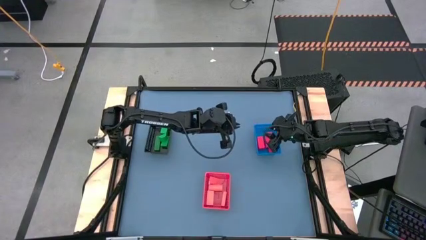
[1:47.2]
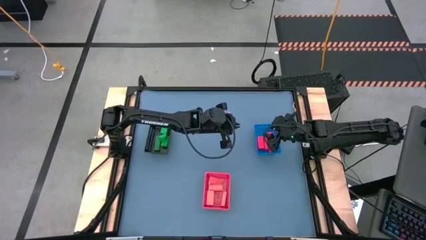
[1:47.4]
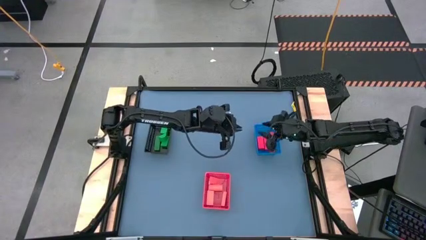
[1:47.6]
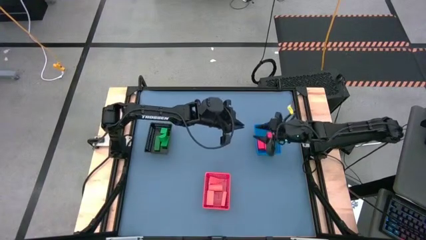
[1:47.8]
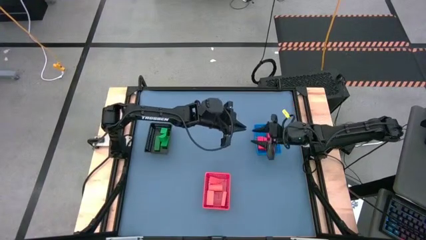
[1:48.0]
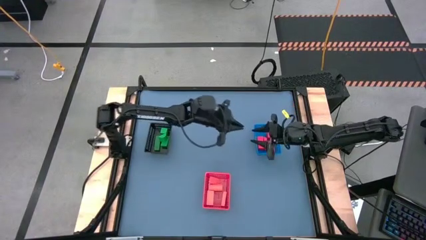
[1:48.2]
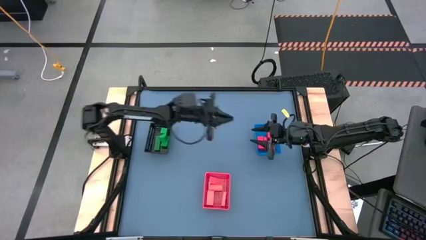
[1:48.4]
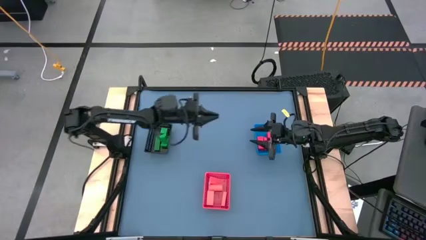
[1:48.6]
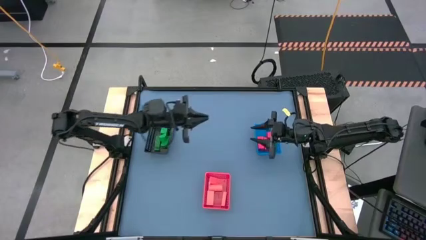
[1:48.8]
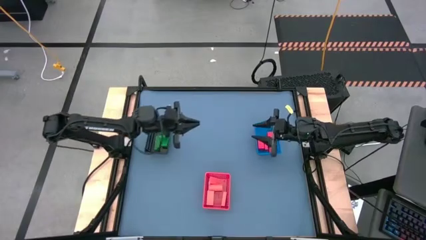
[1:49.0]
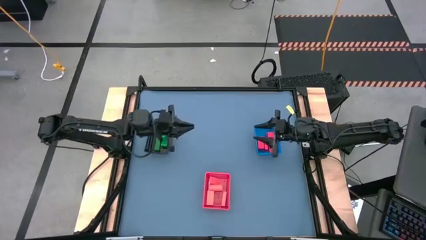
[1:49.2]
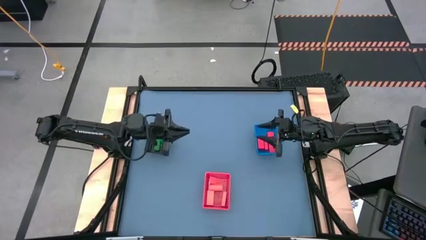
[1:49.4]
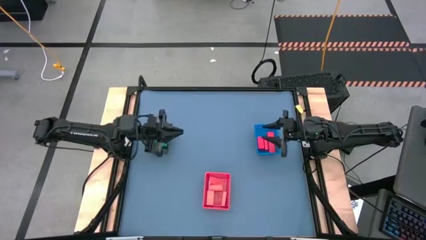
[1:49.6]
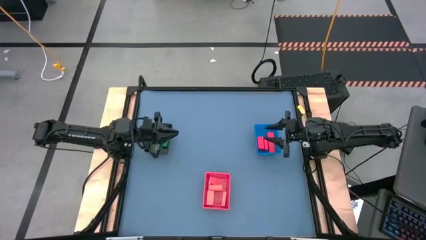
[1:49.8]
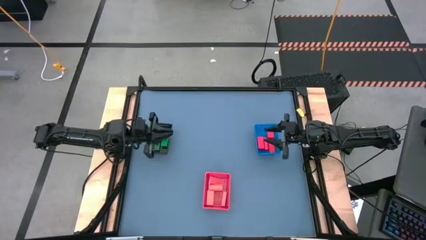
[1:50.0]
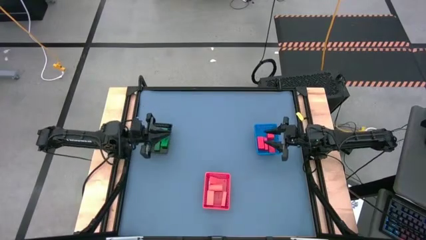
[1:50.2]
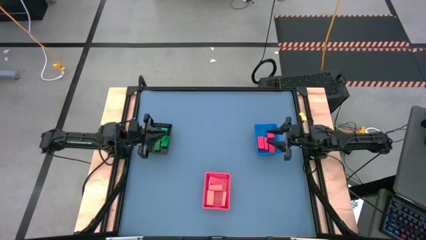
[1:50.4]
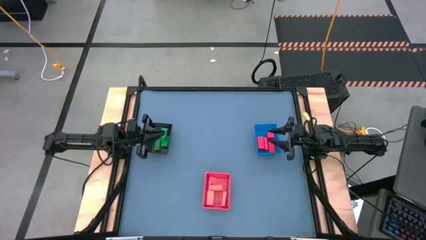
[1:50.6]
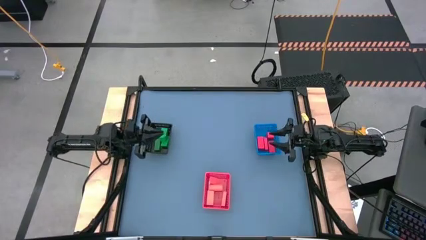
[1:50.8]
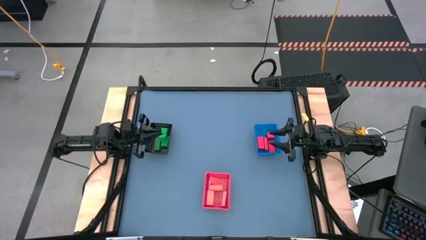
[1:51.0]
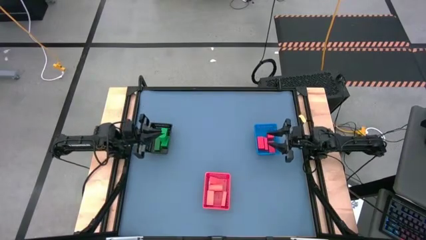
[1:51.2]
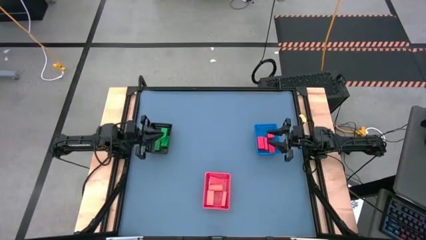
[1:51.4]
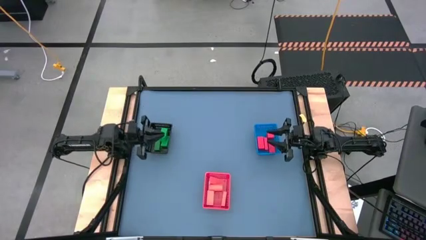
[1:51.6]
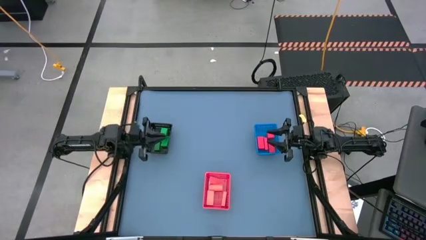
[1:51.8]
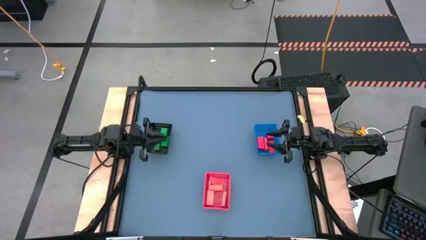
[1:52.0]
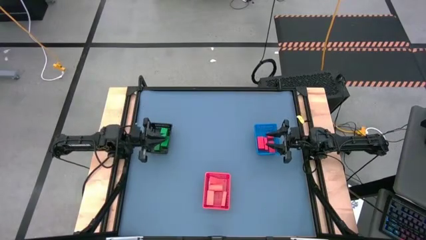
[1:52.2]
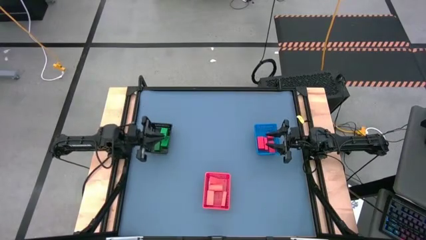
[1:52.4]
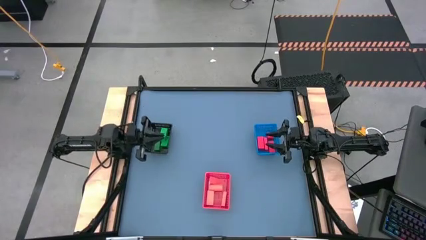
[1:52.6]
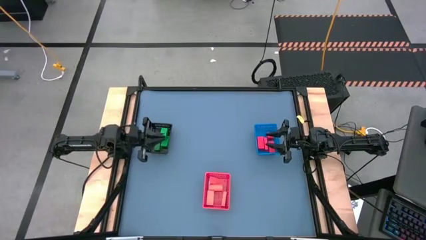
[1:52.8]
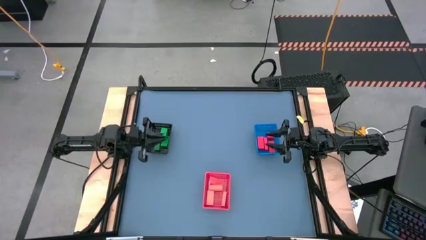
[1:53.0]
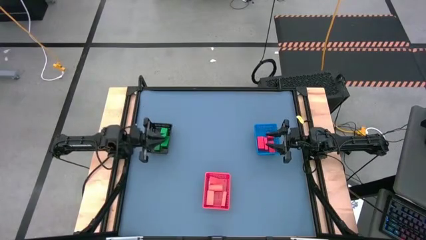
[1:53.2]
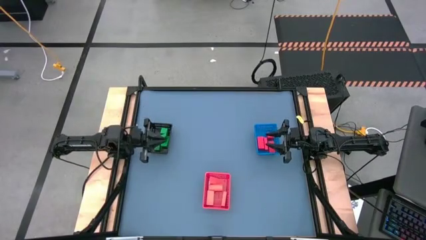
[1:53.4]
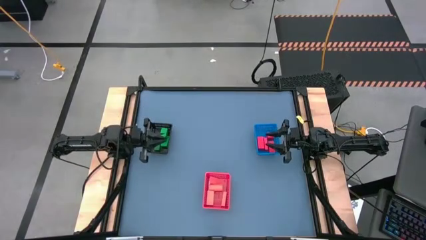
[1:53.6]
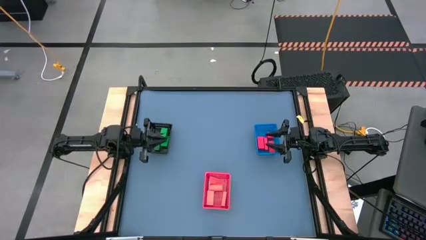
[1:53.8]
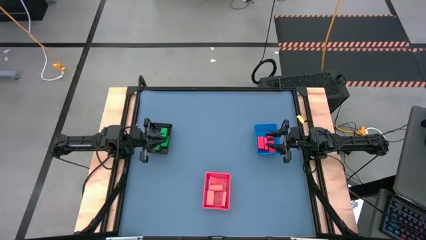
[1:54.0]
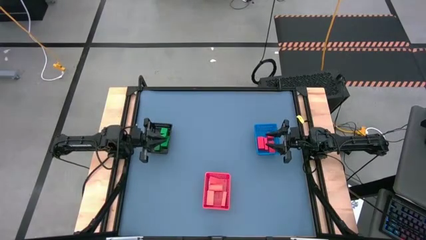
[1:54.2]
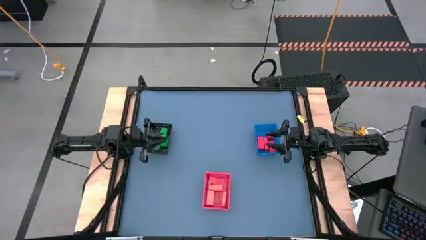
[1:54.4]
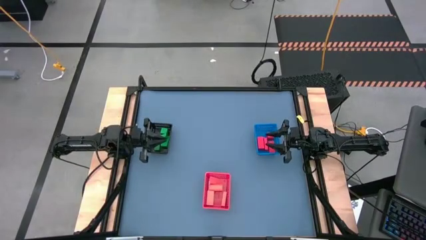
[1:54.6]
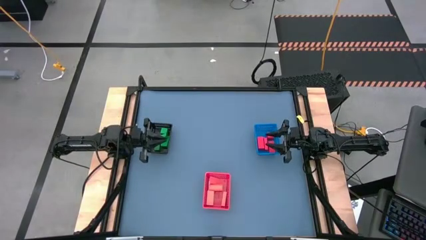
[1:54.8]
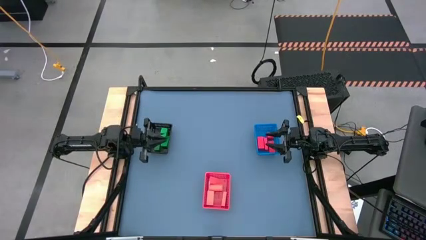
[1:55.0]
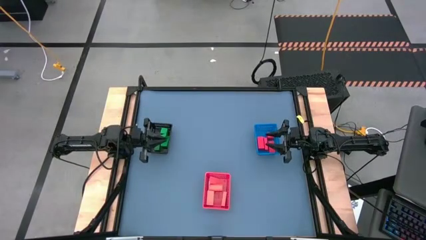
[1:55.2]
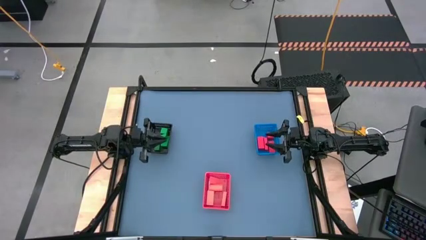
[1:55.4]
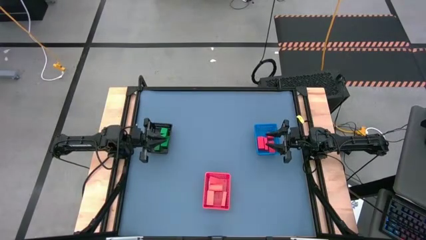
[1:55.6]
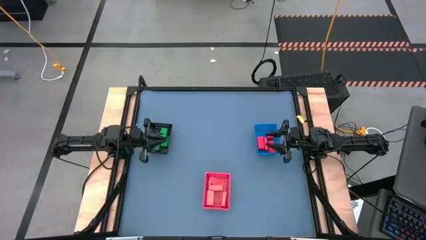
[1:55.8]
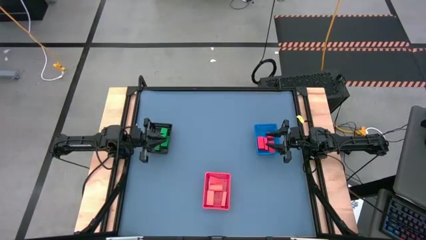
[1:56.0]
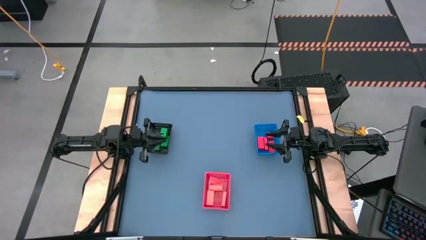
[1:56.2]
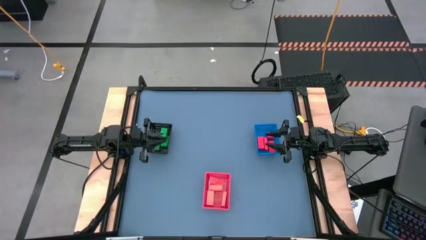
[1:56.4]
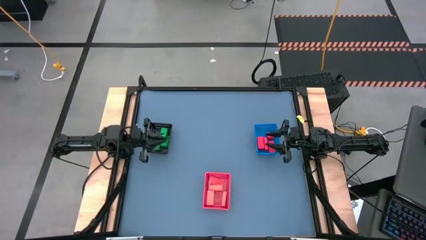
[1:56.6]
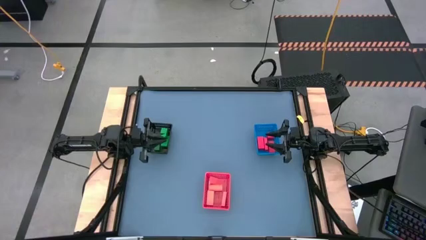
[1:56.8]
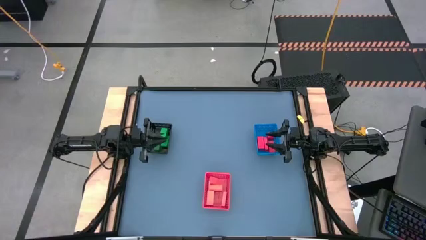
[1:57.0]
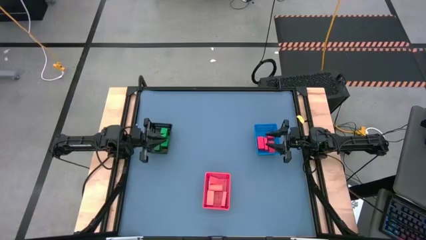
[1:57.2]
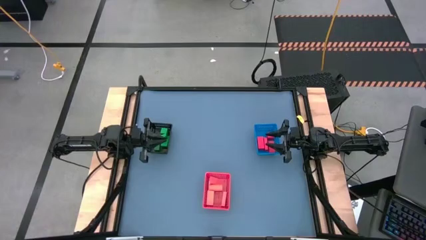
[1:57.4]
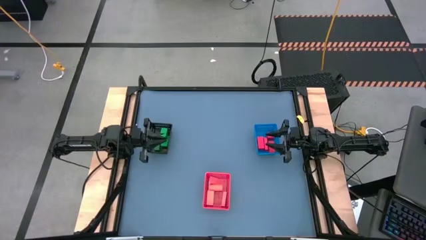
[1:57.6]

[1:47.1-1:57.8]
Task: Sort & place blocks by color
Return to Home Position

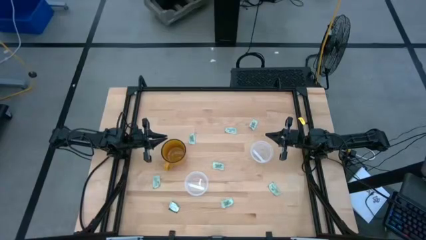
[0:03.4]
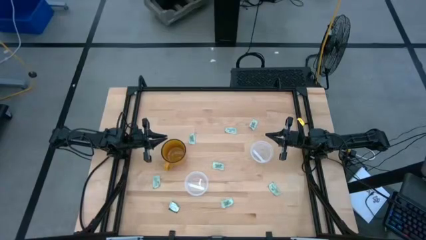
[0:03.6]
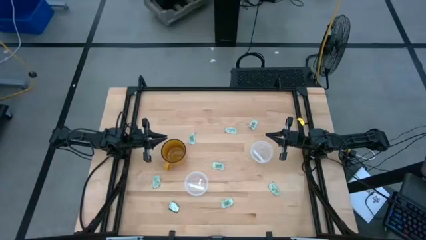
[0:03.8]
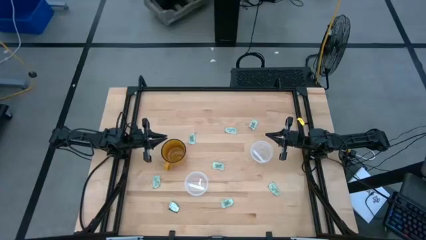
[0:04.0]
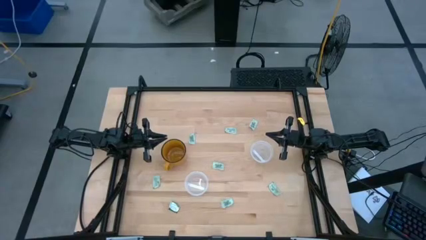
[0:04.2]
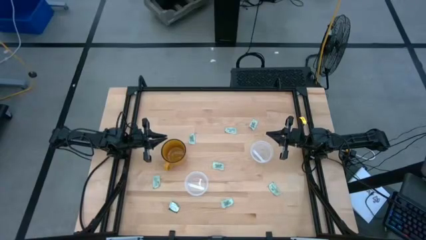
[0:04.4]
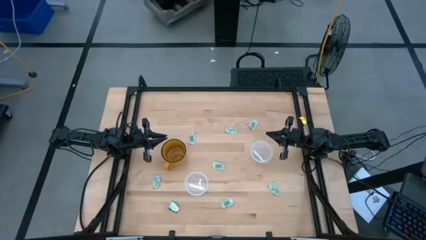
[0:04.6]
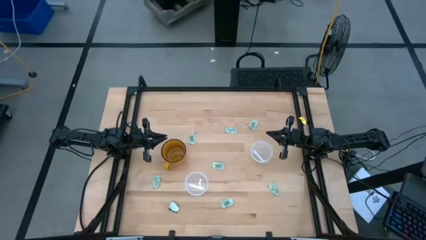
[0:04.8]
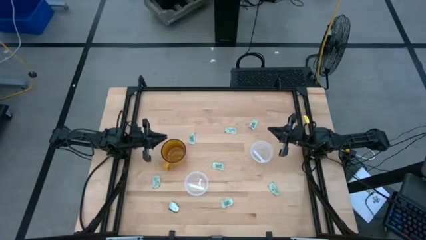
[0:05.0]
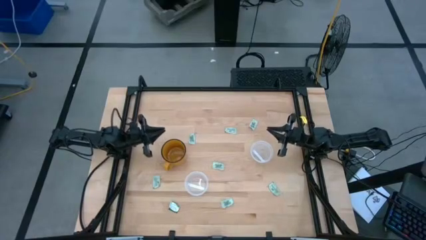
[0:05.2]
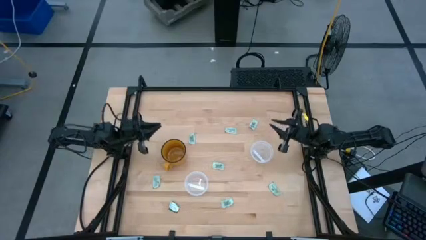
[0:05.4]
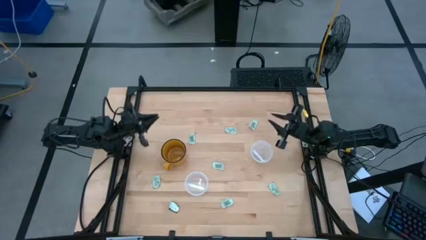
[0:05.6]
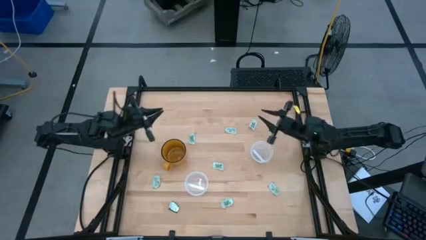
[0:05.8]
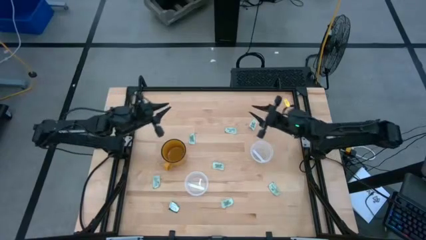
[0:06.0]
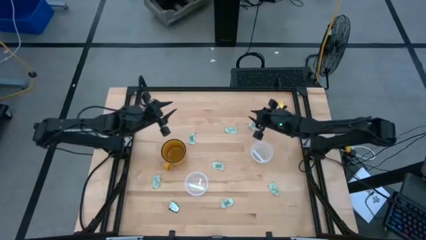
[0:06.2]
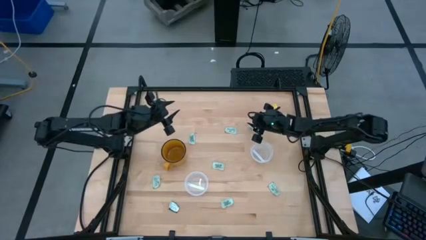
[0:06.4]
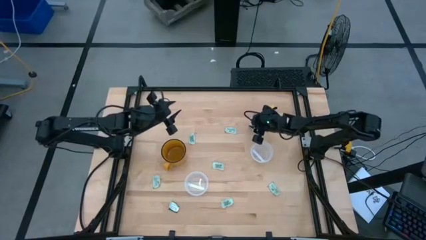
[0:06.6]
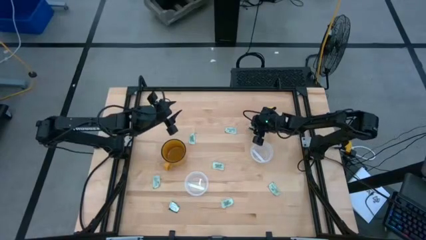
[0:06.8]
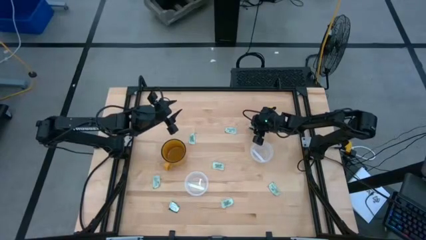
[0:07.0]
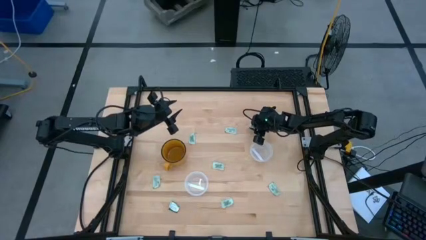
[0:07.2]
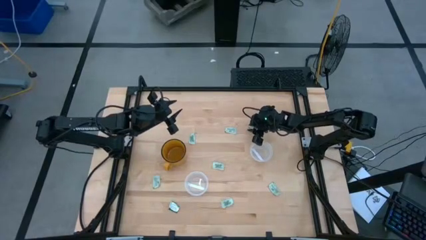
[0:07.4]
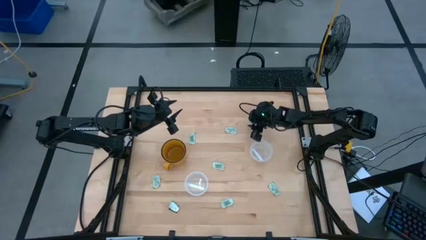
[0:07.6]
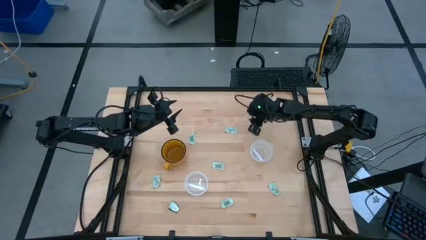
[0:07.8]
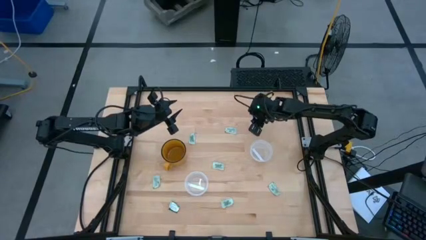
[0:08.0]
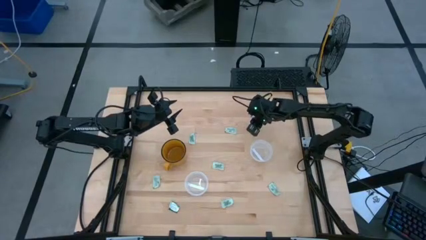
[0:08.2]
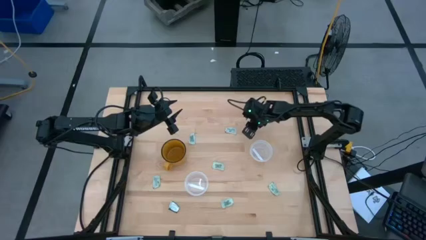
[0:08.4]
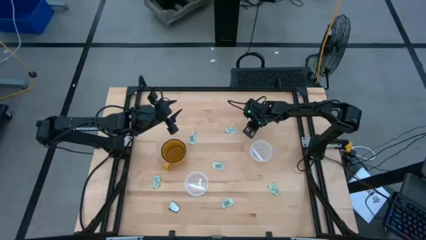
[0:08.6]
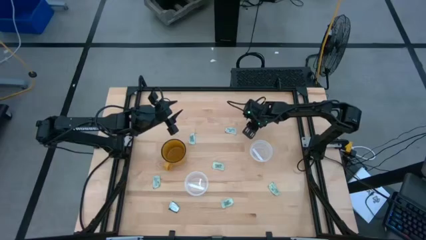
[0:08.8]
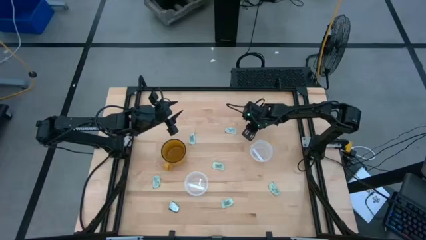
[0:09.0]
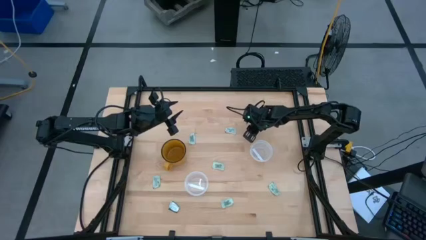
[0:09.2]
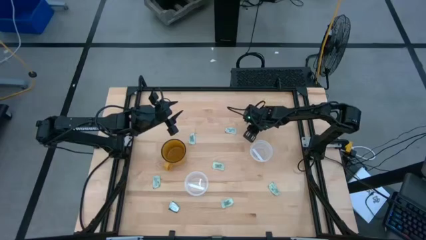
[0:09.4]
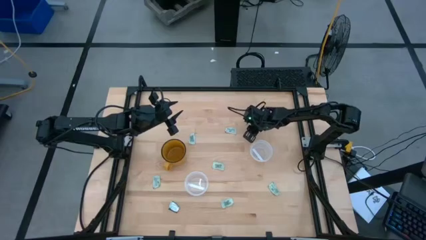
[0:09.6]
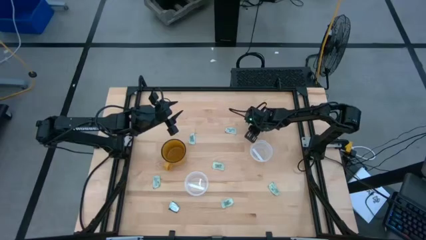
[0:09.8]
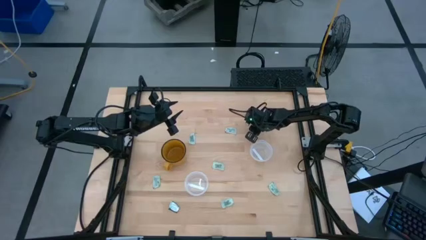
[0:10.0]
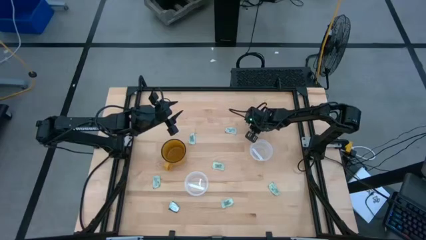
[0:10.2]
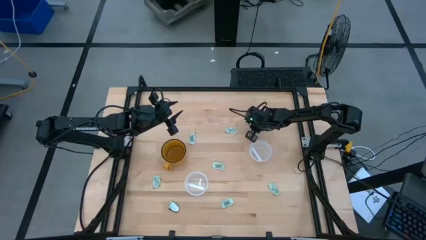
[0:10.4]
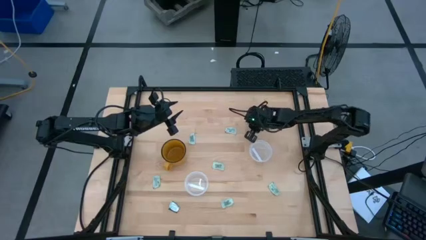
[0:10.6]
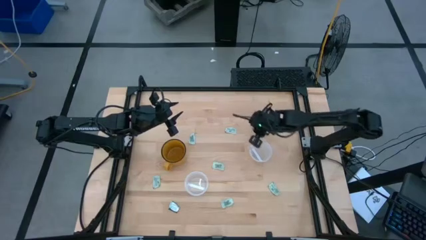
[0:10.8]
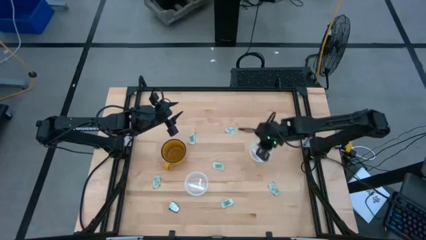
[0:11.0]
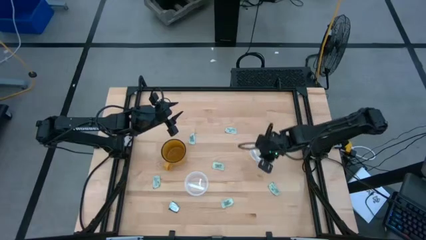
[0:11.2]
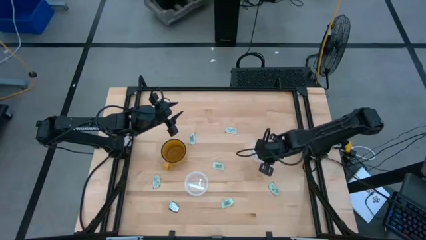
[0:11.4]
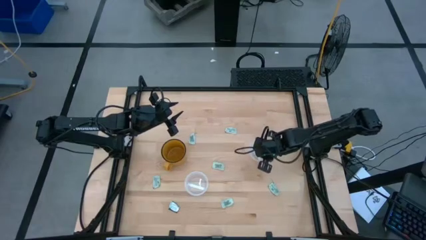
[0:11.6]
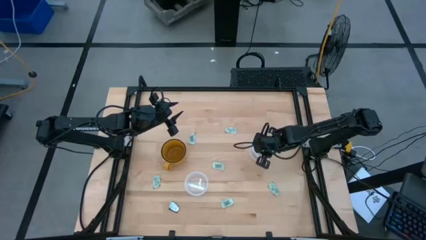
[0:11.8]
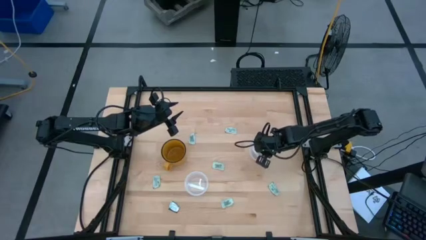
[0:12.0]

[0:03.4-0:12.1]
Task: Pick and place Stevia / Truvia into bins
Put the white stevia packet into the right transparent container
